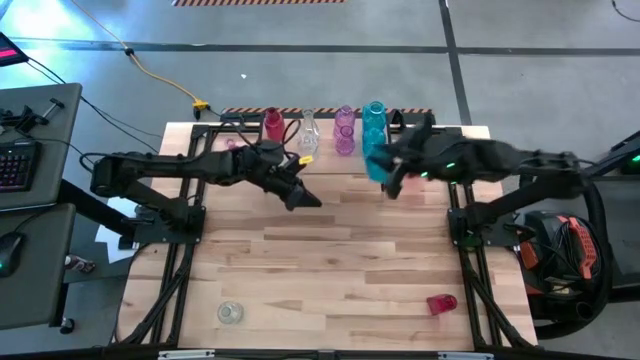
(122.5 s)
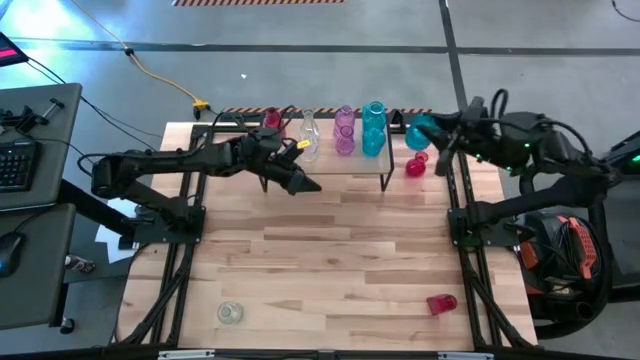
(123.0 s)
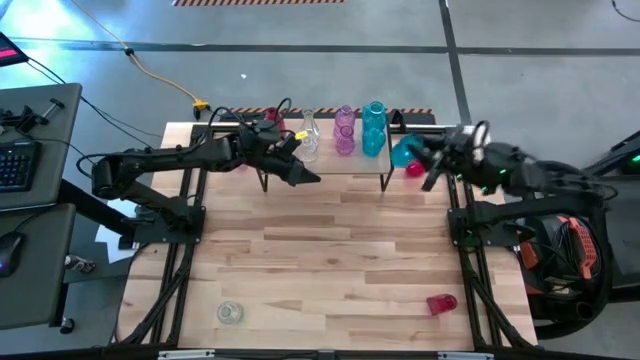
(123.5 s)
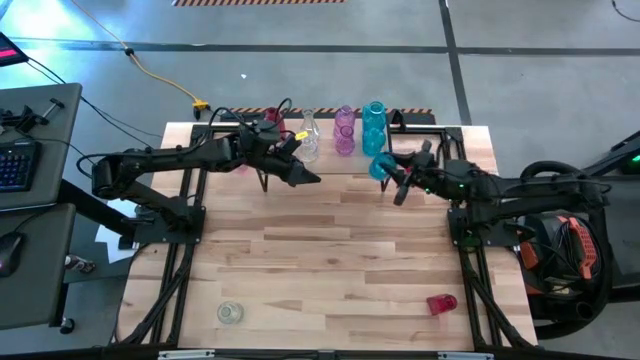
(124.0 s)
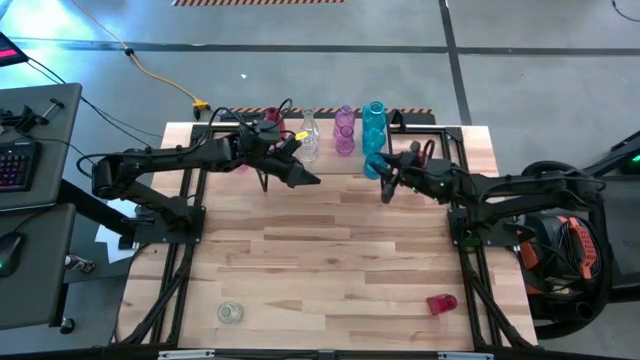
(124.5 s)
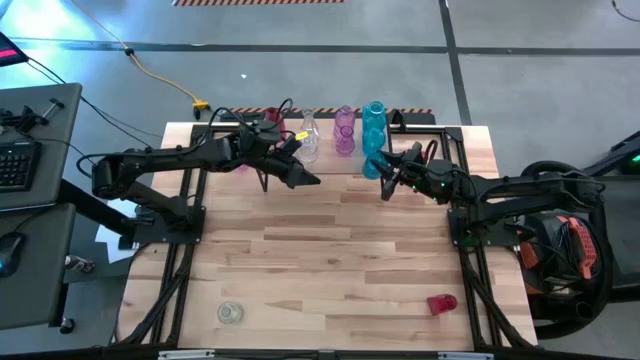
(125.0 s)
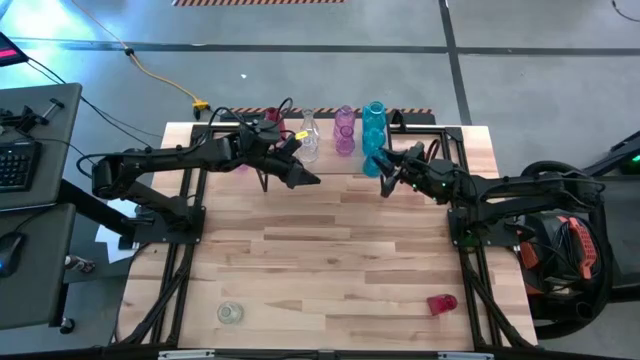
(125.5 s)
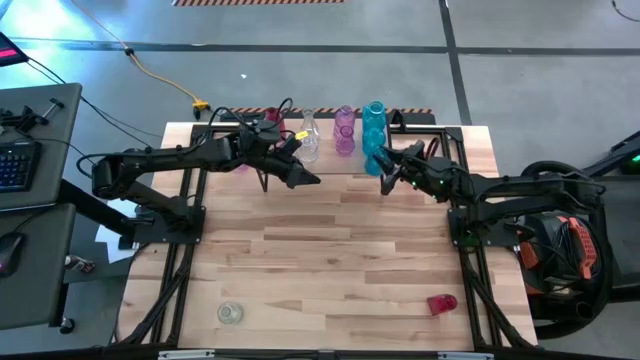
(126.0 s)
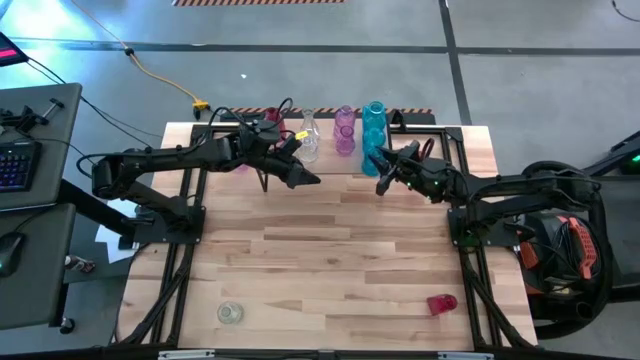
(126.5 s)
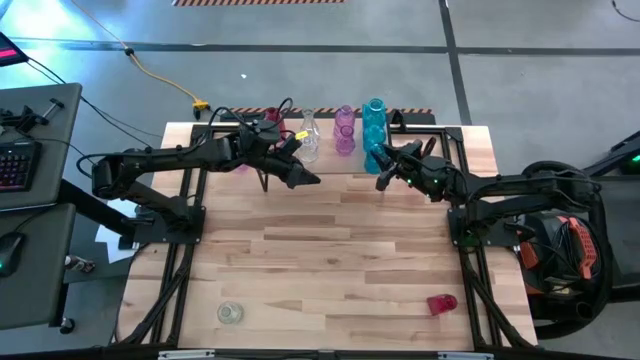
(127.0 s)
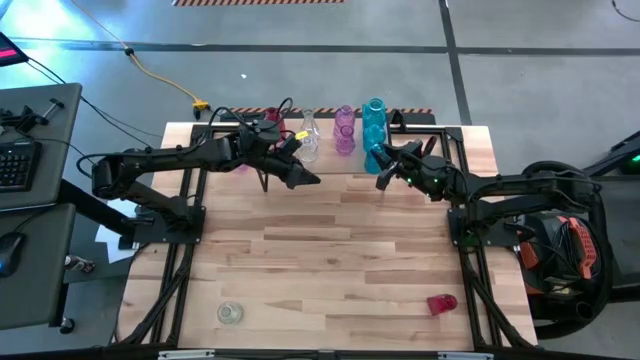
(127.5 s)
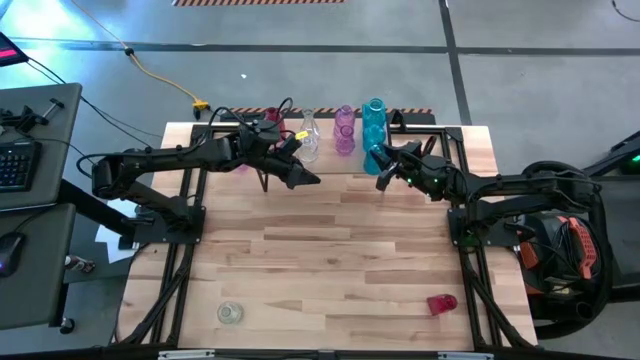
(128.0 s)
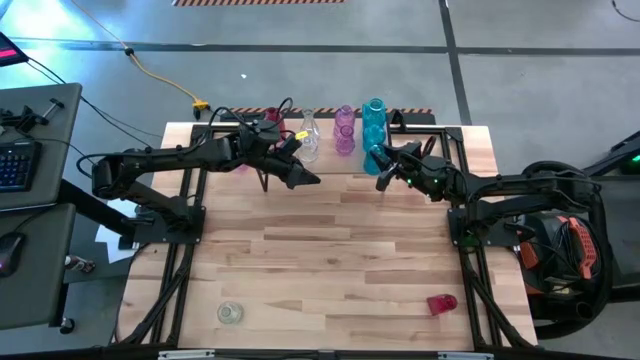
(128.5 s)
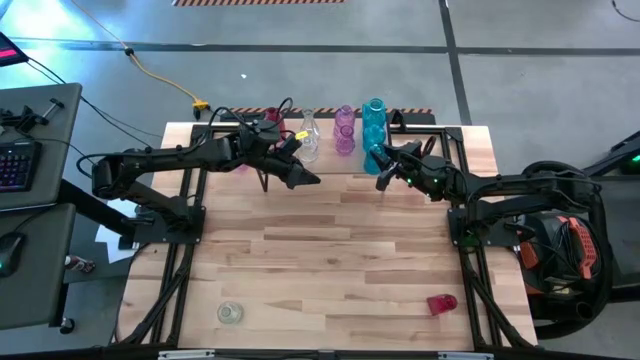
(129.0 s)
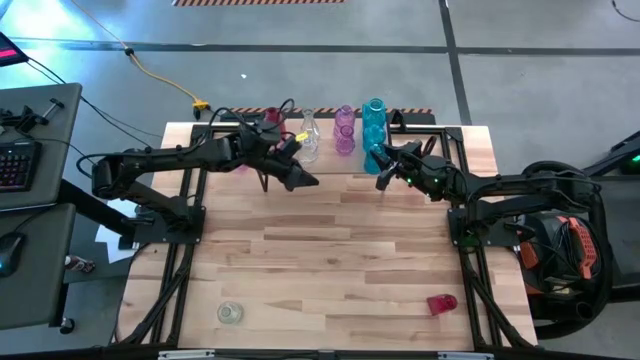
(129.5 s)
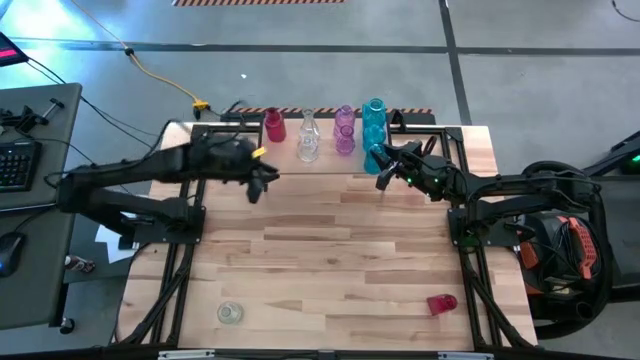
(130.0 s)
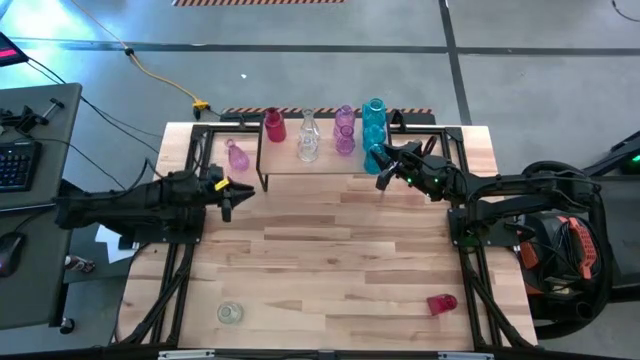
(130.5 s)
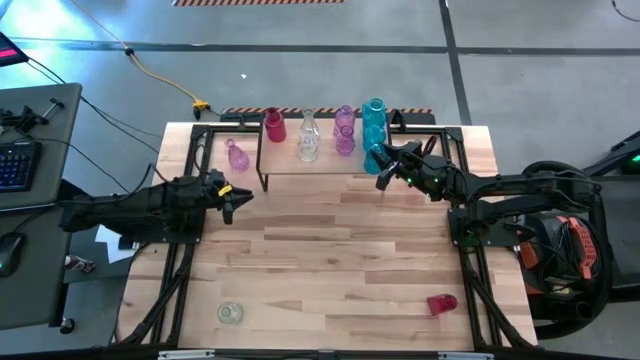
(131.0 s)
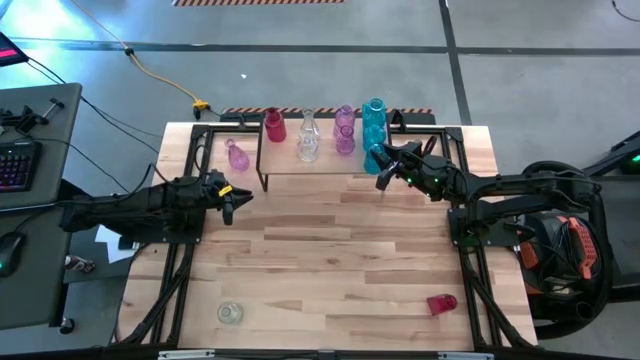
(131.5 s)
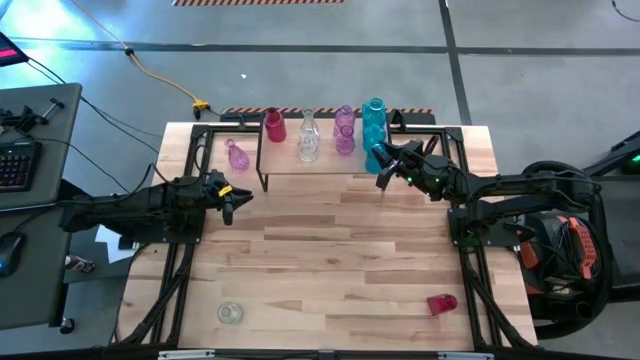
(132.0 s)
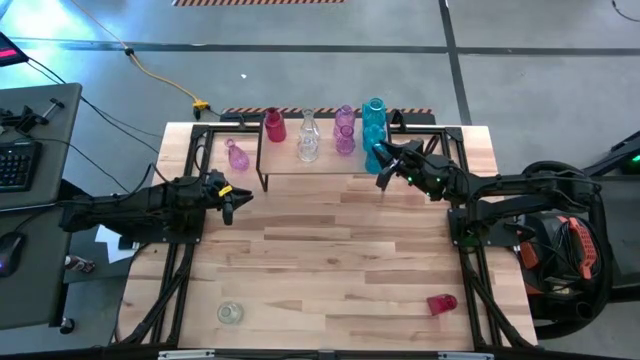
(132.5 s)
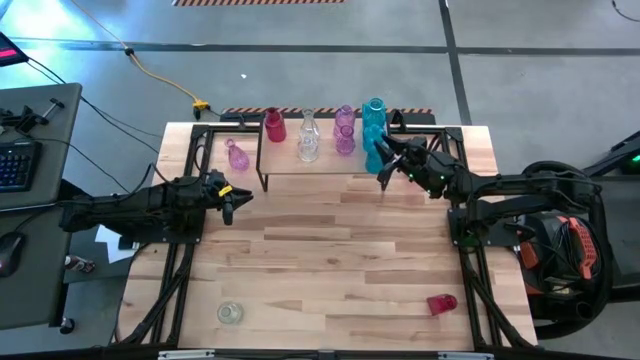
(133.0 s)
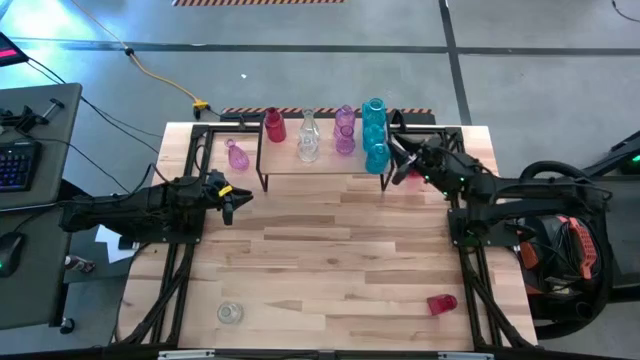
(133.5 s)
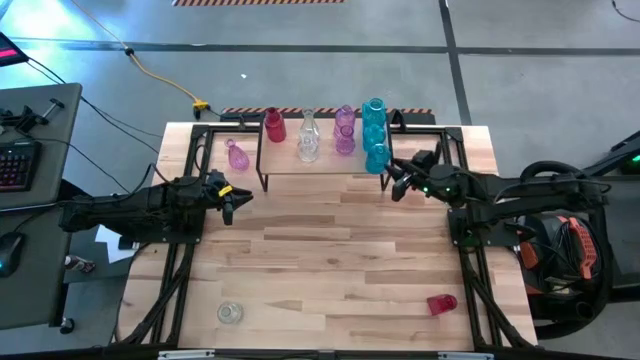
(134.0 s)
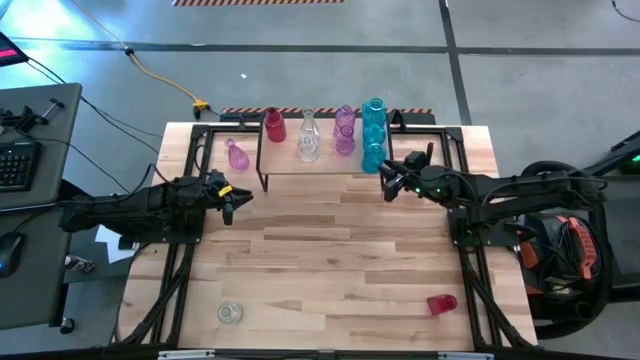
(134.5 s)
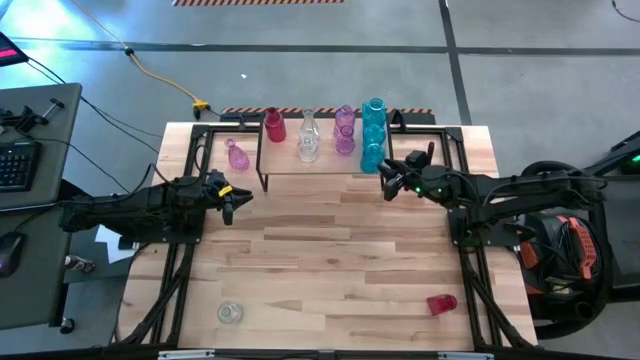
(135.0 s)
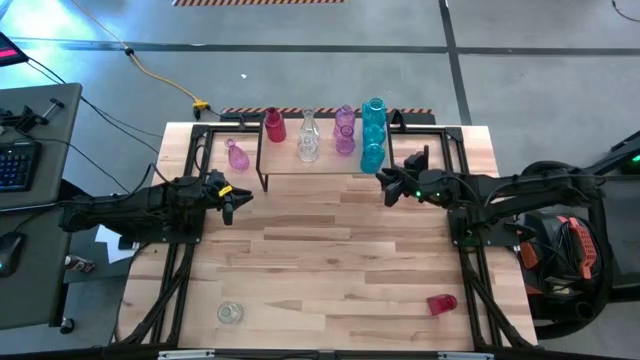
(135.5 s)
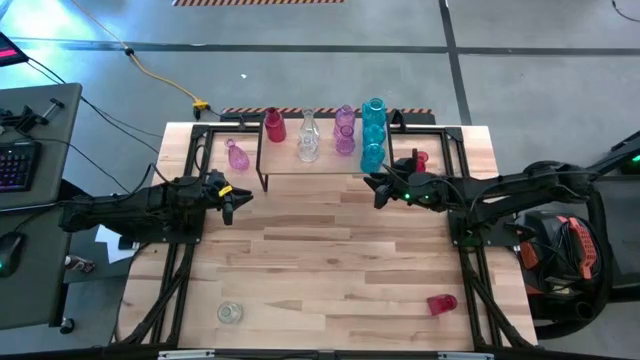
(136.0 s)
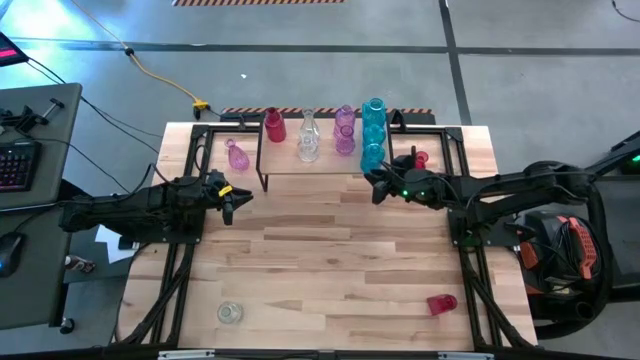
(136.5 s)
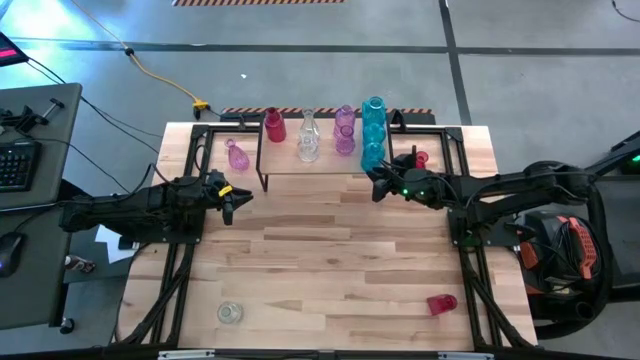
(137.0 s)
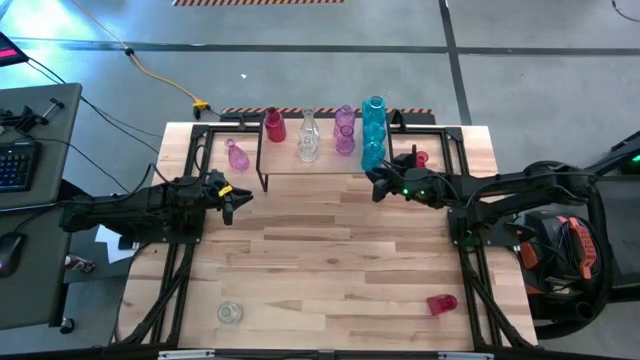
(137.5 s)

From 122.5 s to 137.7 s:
Task: sort vases onto shelf
Put the blue vase on the shelf aligned with the other blue vases

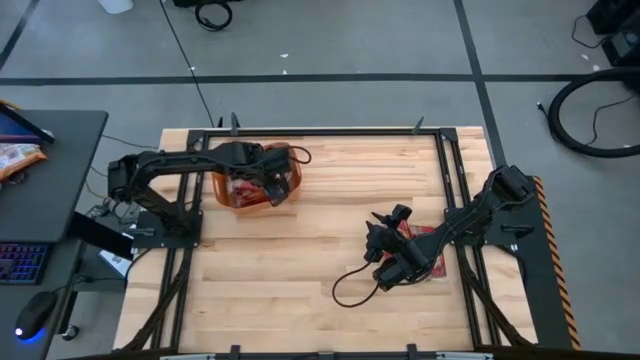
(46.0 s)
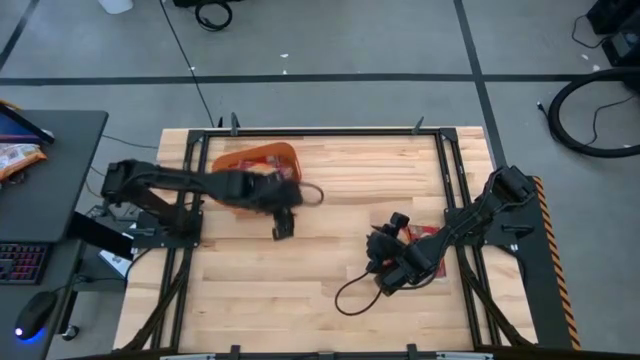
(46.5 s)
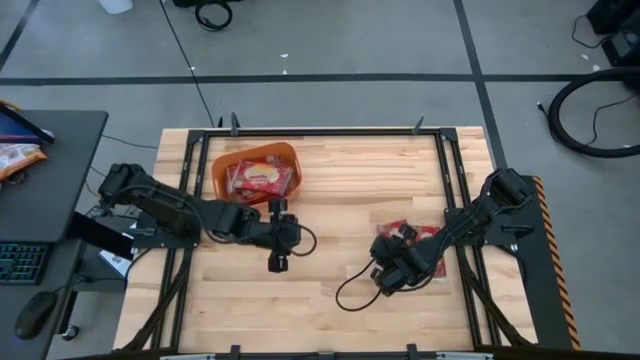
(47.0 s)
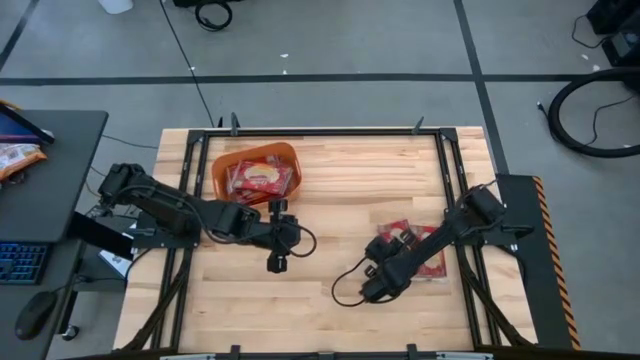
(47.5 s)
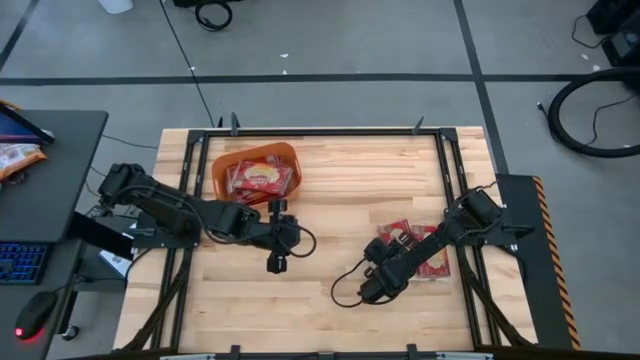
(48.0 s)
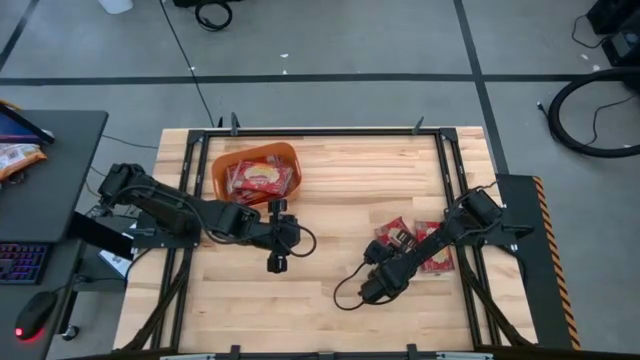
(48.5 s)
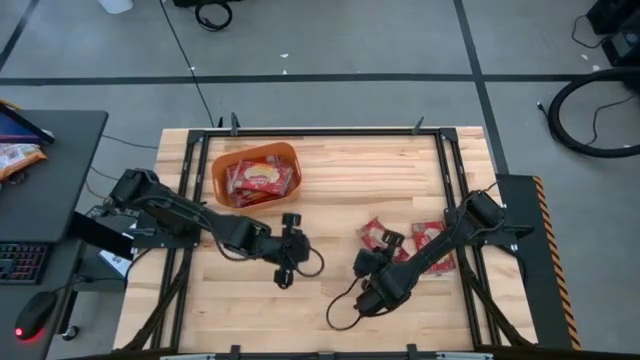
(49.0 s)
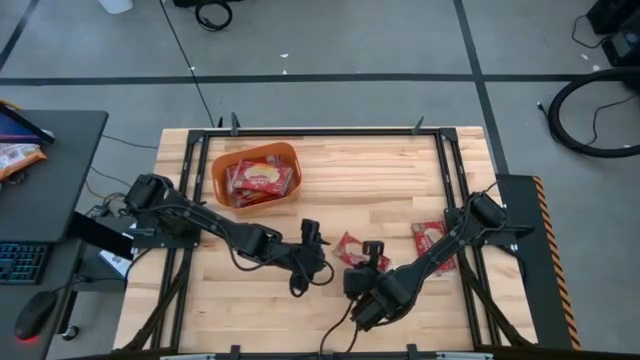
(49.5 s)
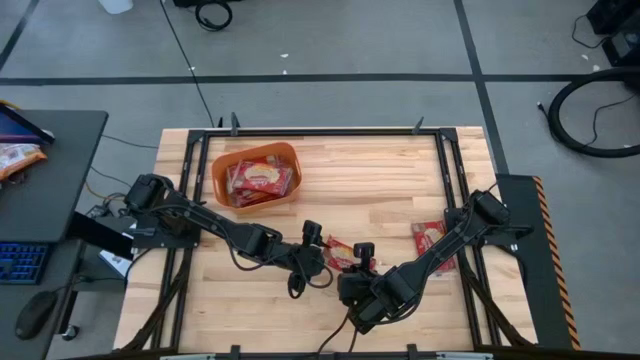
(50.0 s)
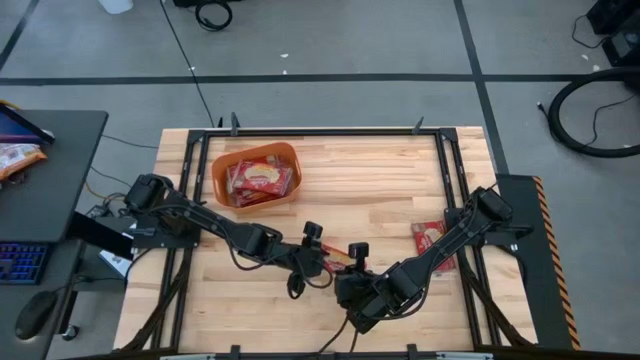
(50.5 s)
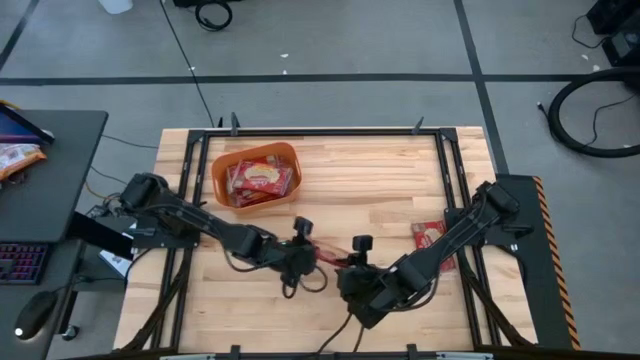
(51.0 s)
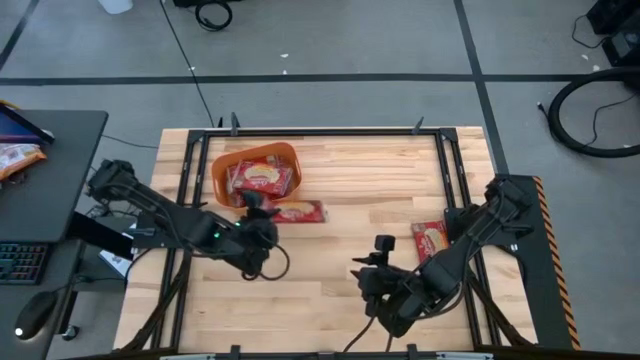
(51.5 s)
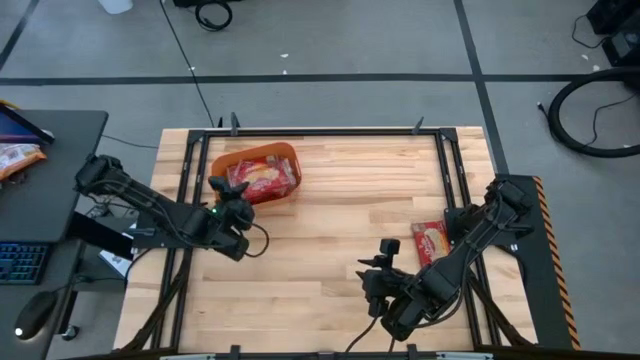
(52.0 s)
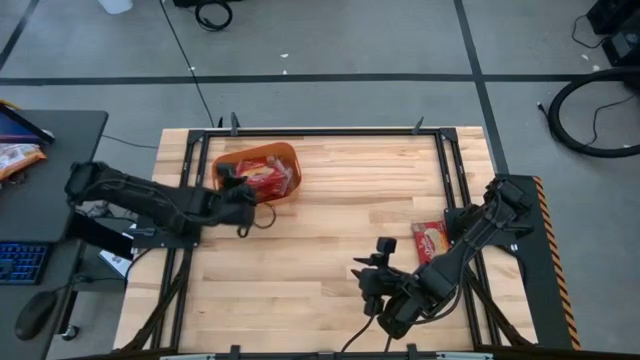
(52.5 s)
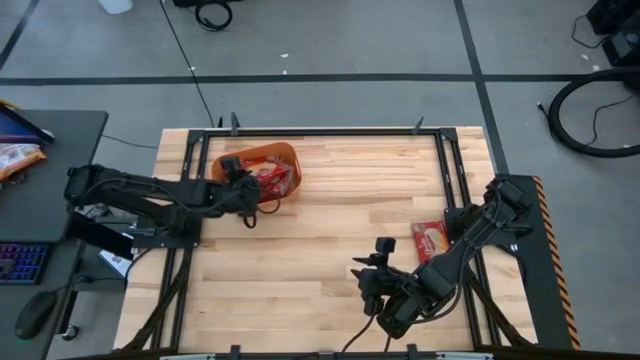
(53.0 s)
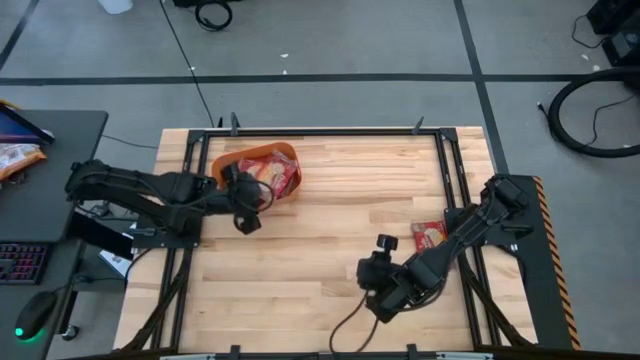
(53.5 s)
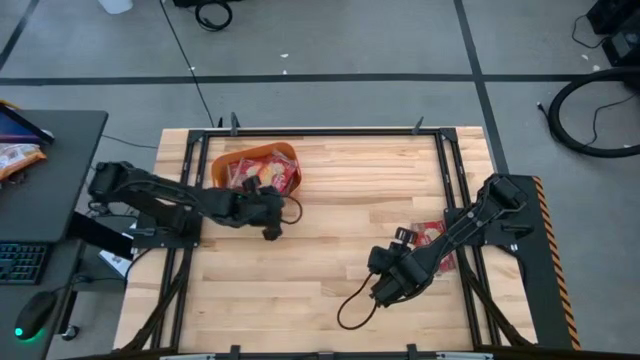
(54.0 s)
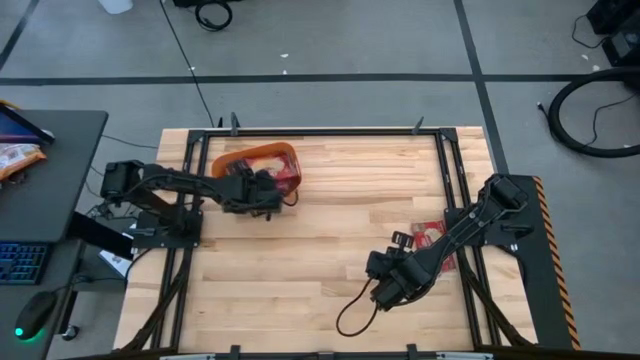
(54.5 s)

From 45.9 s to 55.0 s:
Task: Sort popcorn bags into baskets
Put the popcorn bag into the orange bin
